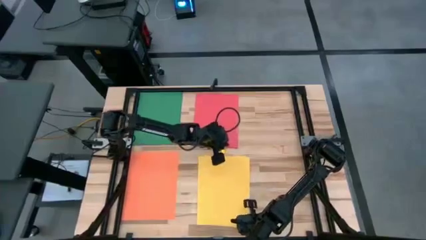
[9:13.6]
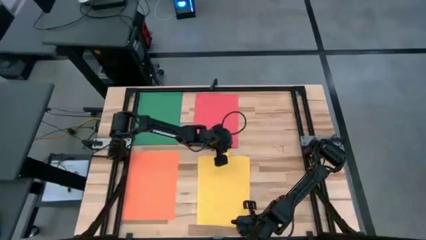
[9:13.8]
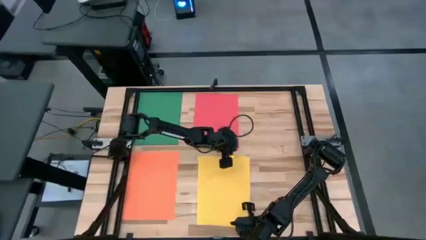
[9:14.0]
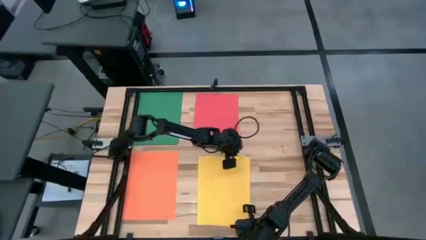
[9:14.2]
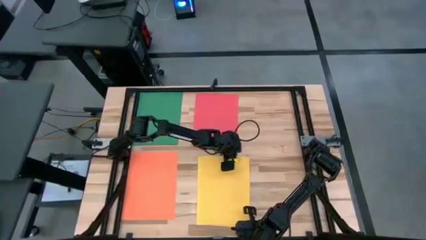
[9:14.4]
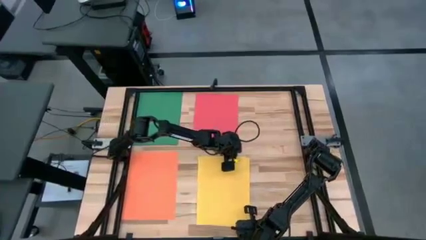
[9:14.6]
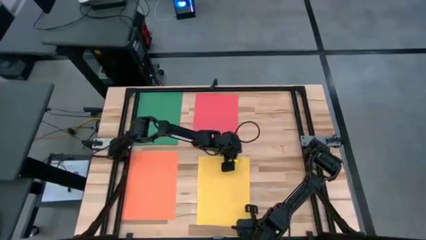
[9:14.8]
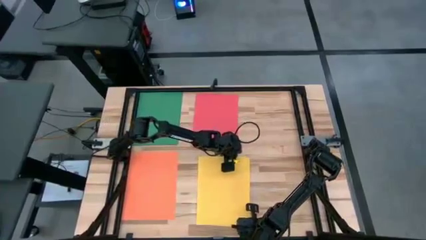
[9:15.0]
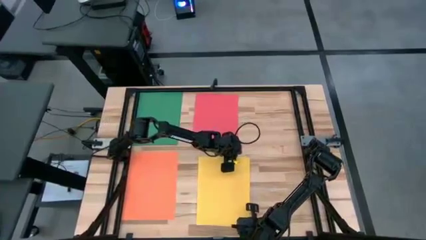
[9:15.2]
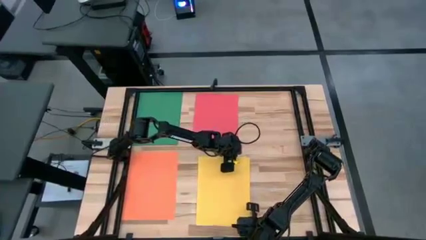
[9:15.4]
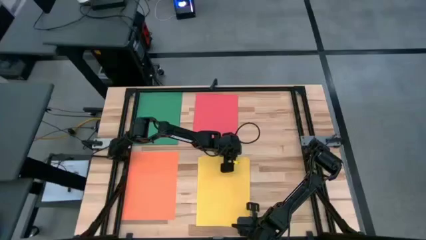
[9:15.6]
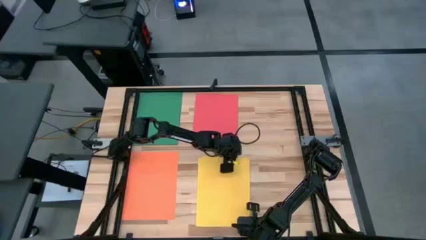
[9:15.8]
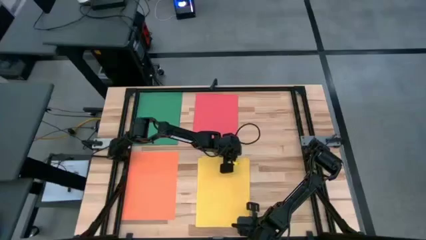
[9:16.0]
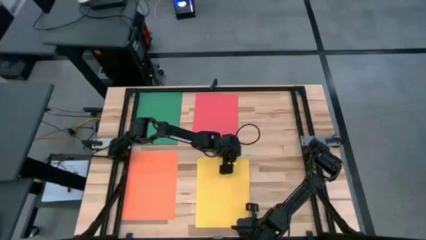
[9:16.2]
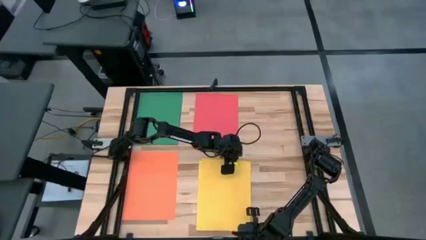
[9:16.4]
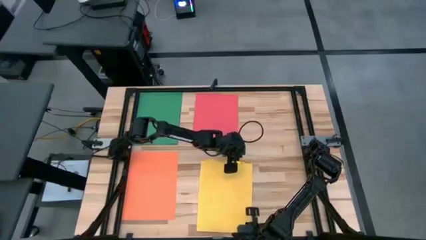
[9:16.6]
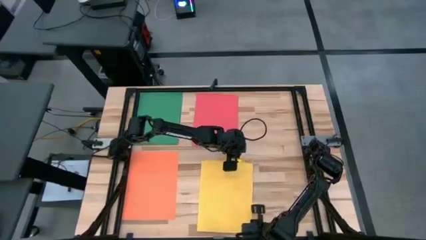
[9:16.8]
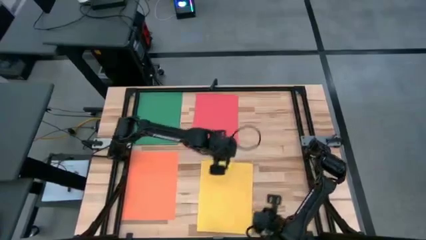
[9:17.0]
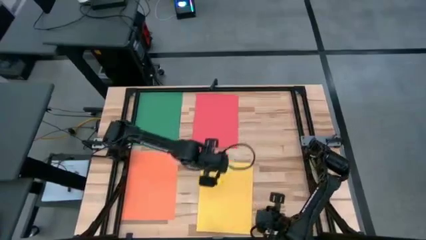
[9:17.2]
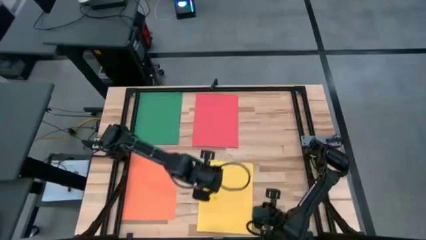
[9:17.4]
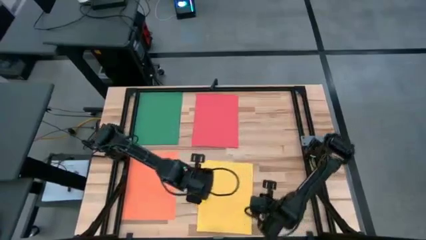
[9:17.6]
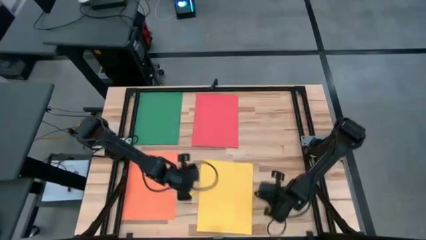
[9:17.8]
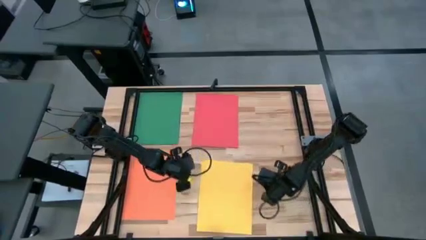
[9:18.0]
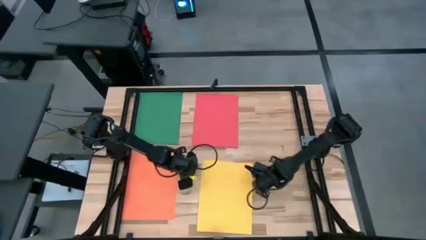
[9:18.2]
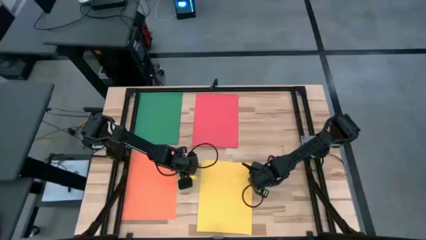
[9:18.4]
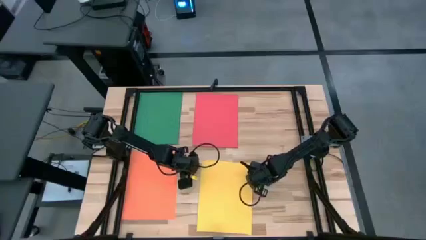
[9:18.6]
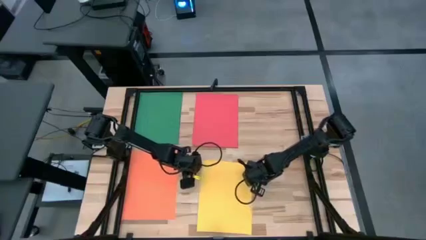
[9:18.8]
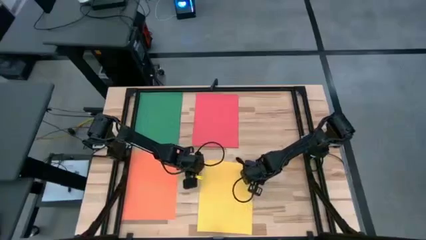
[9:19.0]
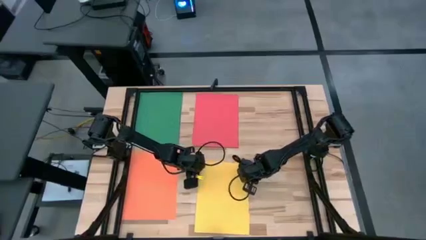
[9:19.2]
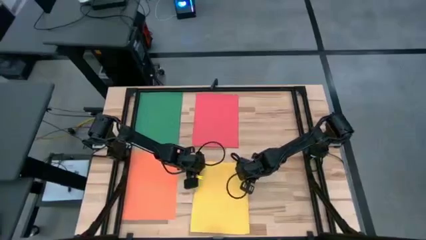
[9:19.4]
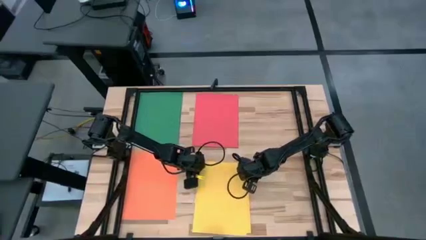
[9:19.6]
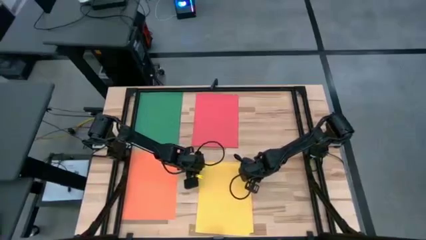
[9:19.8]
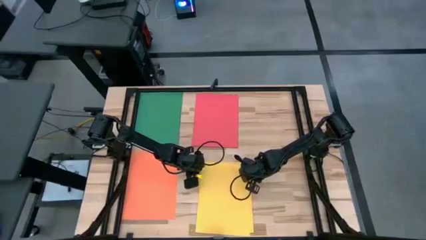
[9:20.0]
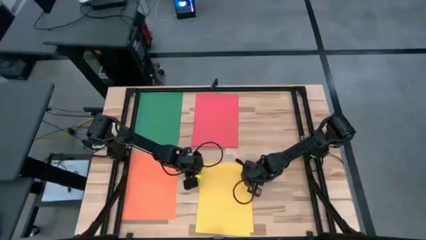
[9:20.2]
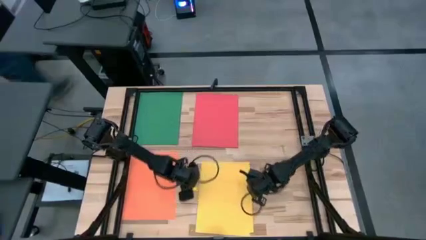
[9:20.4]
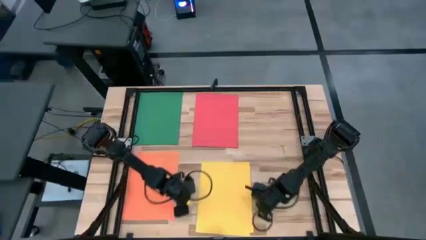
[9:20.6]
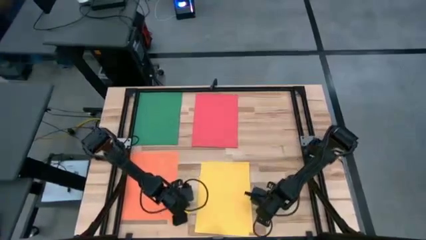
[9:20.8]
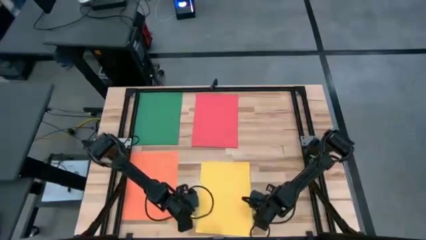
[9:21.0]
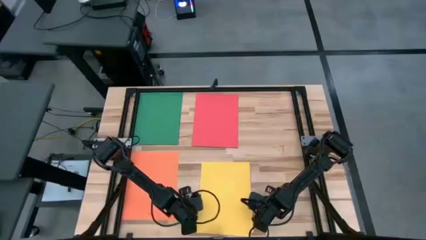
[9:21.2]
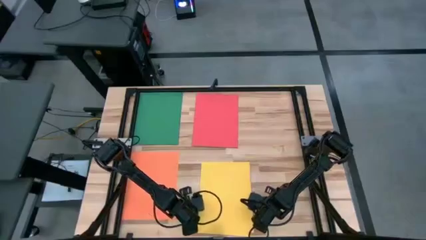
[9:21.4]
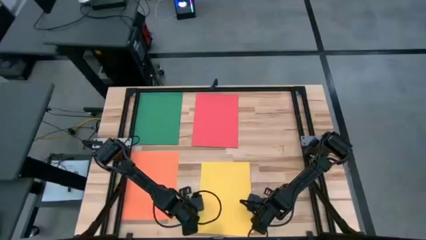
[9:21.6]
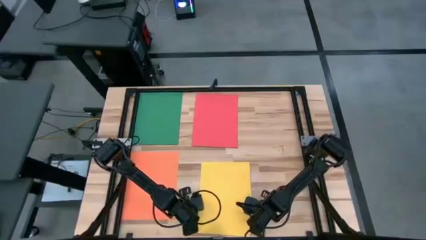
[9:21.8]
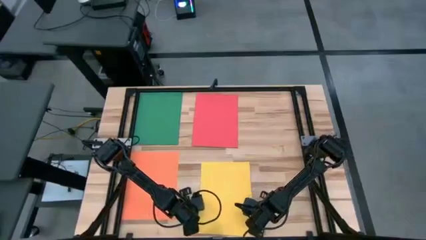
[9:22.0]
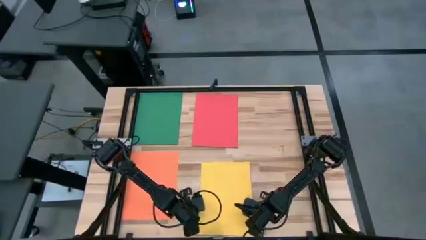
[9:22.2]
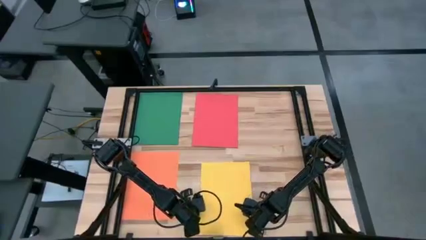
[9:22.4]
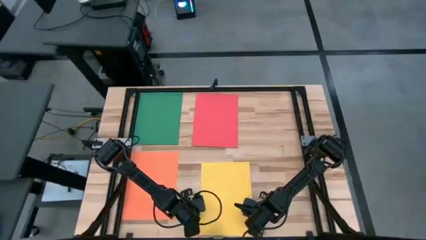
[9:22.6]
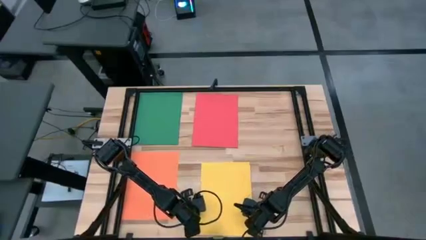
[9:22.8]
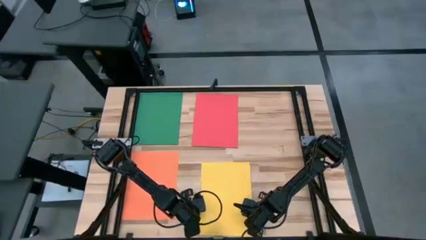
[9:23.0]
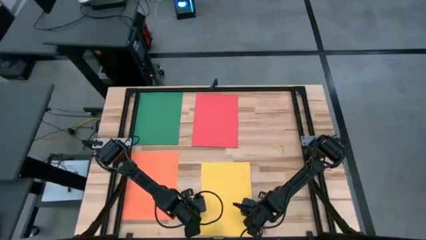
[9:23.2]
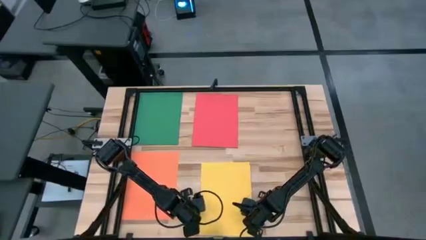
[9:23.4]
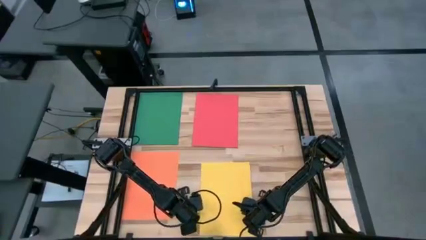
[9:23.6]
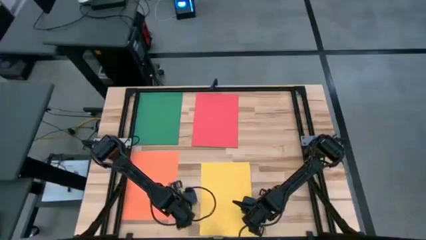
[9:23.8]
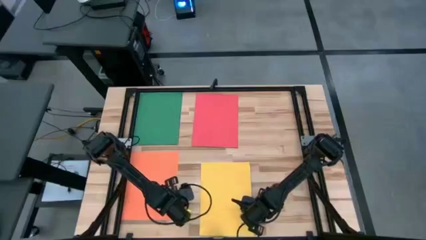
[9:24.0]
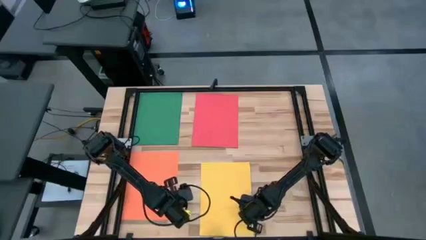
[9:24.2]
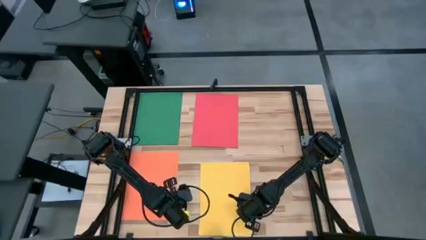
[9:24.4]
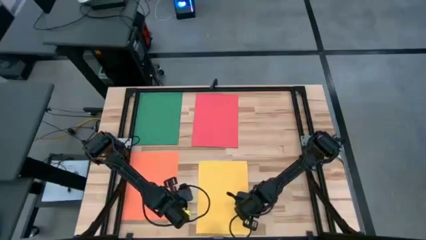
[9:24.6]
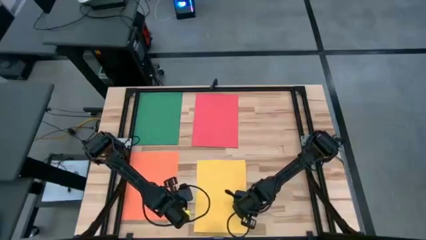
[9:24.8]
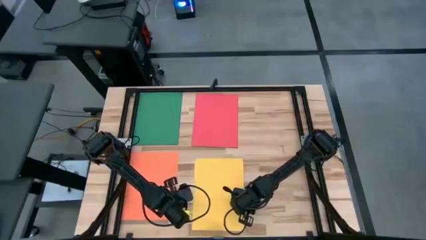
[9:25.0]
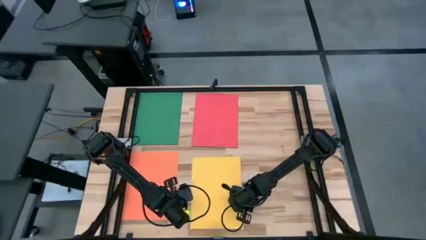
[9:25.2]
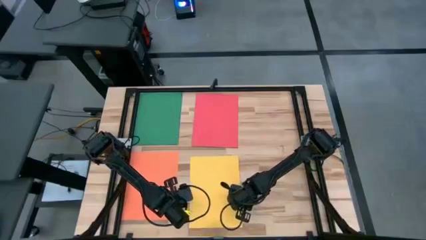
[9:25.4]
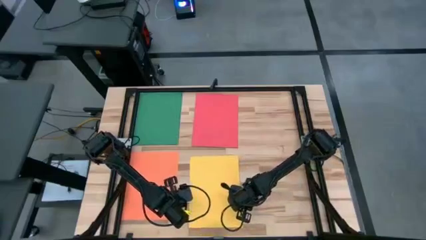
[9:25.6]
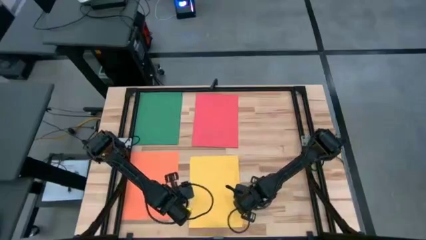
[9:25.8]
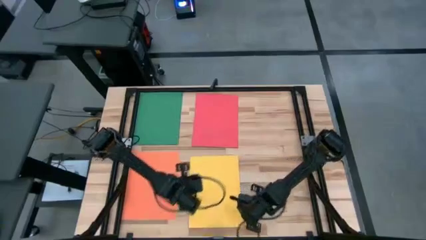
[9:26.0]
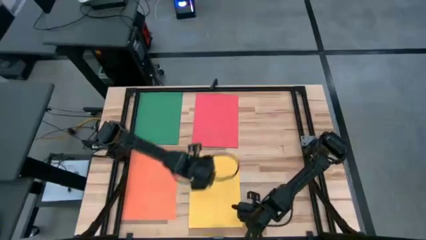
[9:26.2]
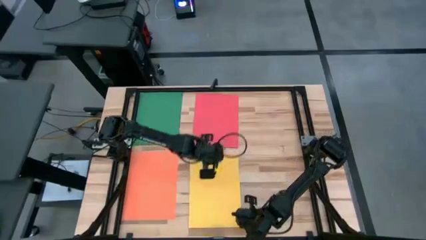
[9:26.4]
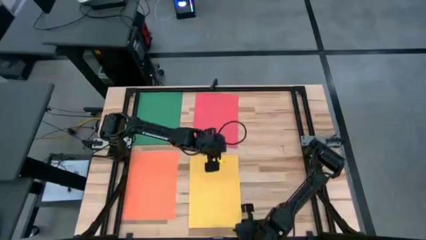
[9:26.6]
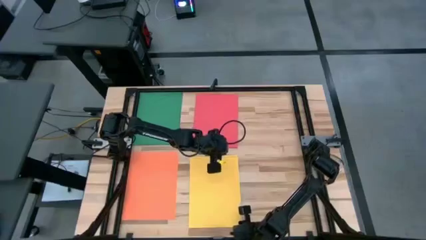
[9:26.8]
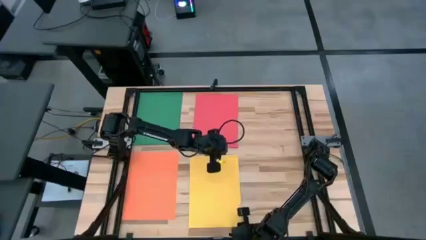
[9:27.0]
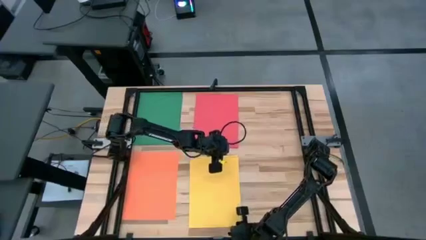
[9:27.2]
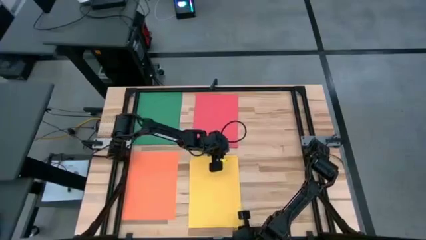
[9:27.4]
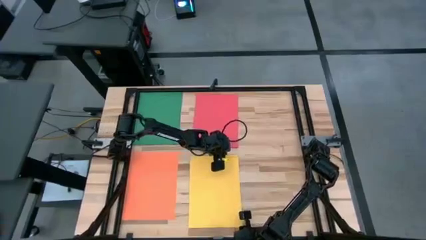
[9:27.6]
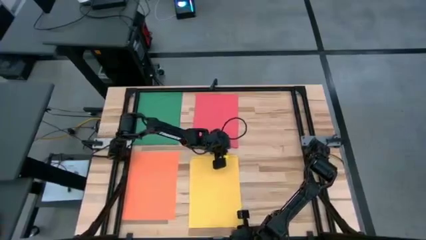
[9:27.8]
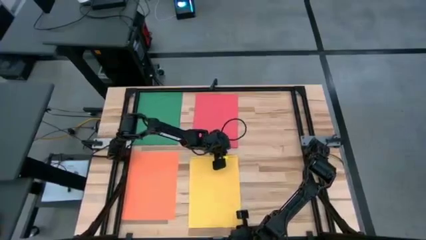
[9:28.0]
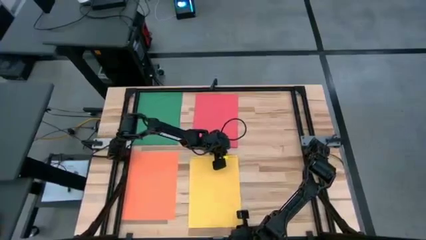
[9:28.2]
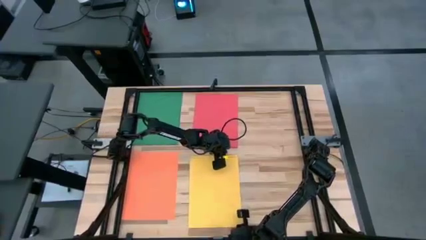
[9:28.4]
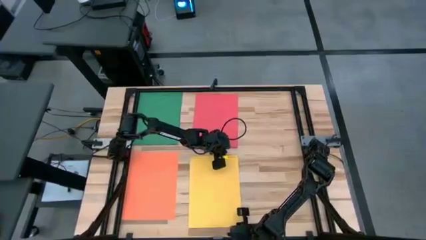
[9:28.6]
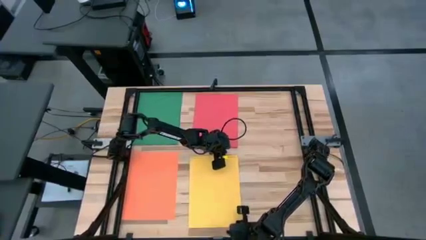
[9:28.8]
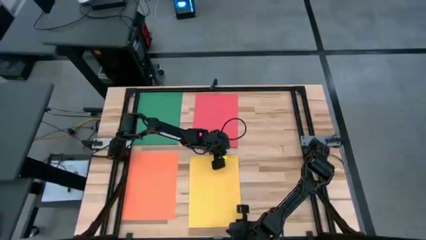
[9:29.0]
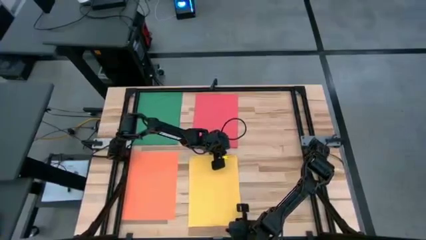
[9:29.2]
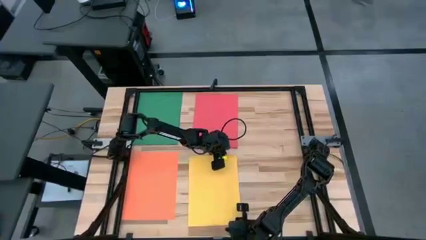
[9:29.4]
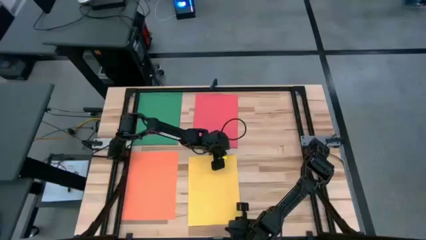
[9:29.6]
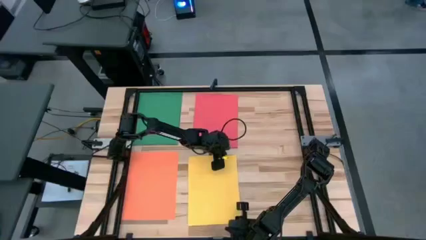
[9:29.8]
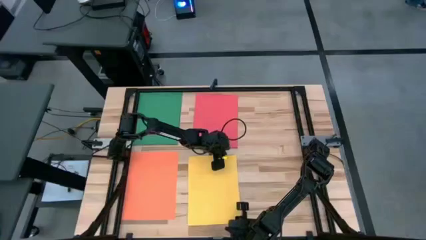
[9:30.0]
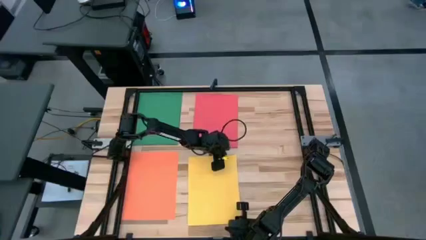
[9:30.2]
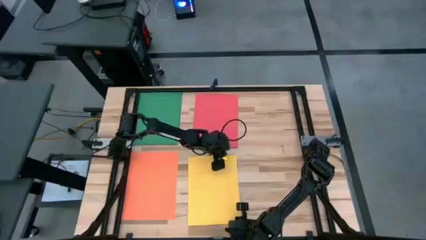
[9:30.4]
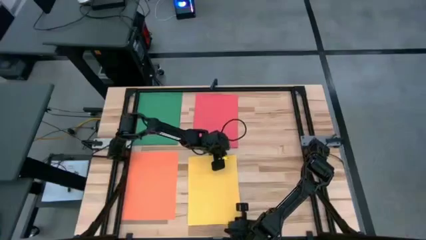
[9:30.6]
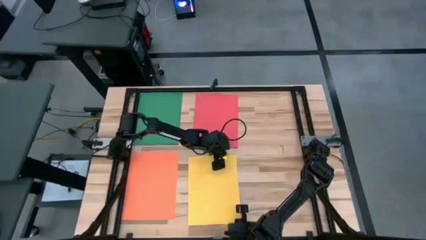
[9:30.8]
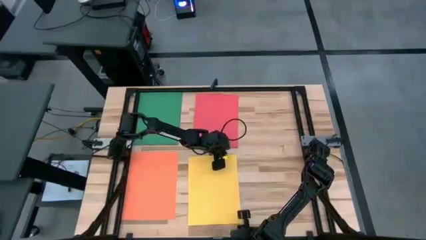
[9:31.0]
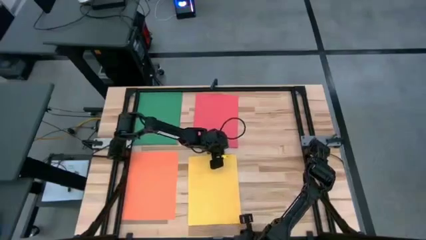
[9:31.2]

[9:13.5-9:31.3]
Task: Organize paper
Stack the yellow paper on top of the yellow paper
